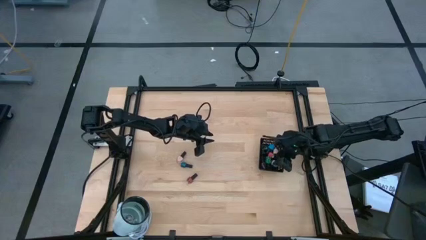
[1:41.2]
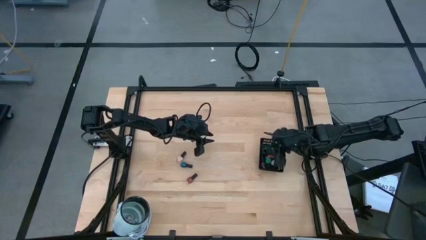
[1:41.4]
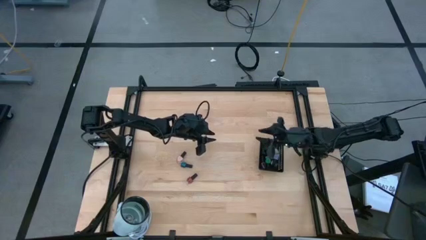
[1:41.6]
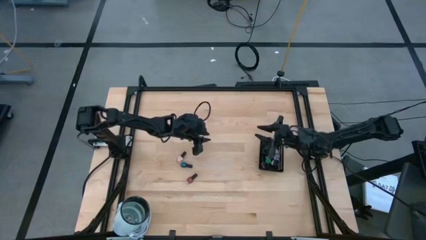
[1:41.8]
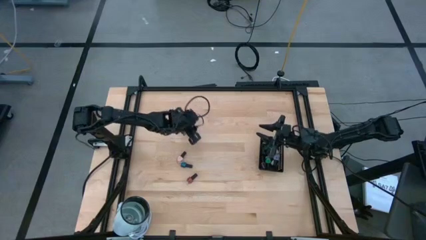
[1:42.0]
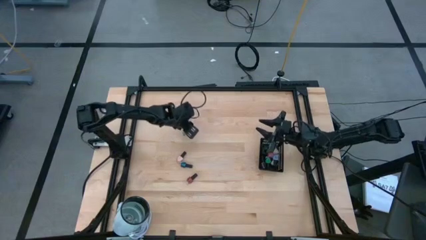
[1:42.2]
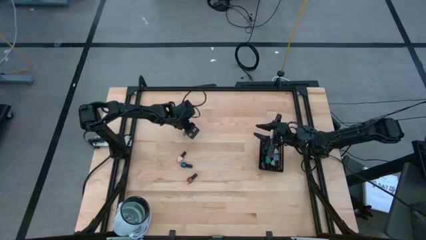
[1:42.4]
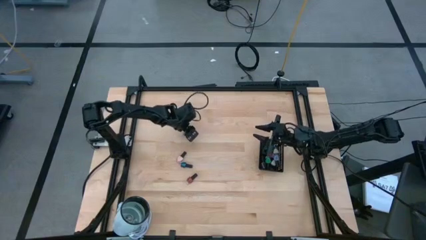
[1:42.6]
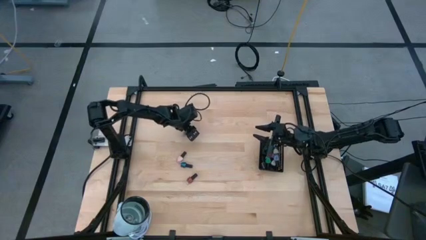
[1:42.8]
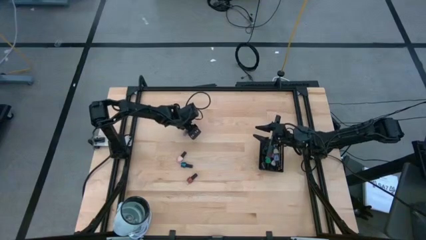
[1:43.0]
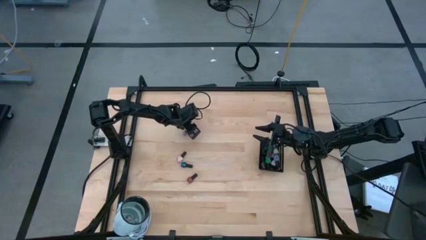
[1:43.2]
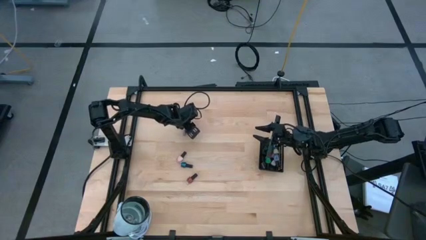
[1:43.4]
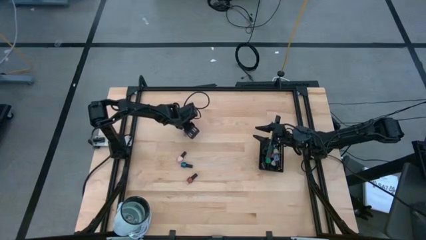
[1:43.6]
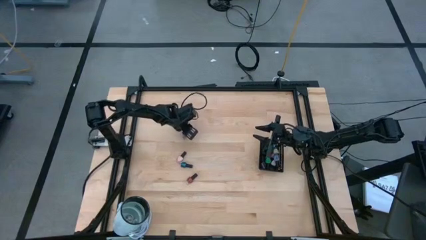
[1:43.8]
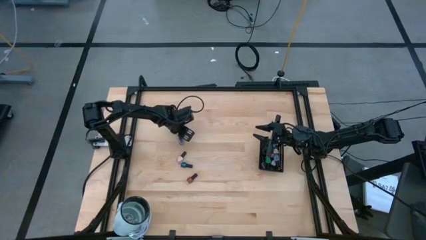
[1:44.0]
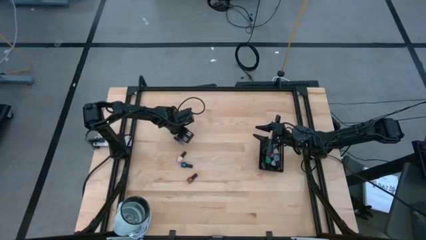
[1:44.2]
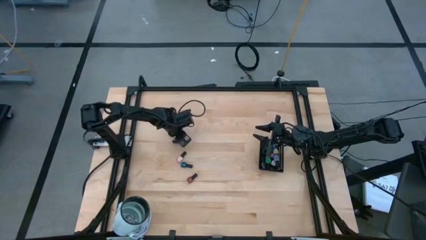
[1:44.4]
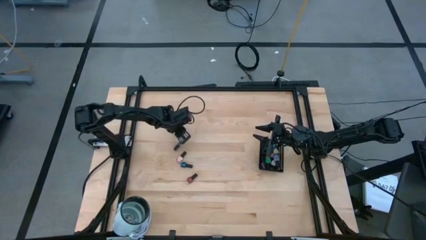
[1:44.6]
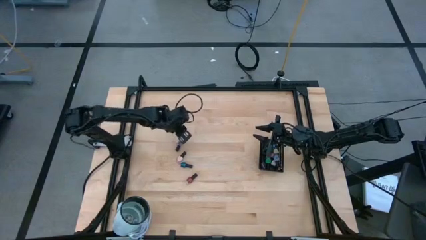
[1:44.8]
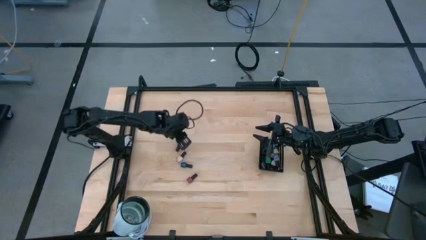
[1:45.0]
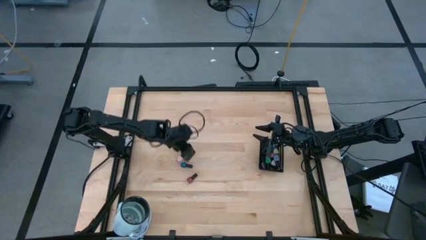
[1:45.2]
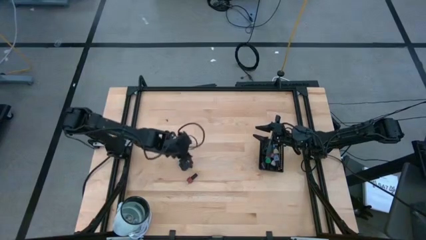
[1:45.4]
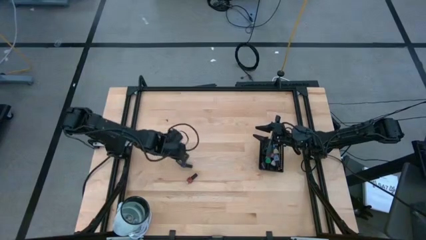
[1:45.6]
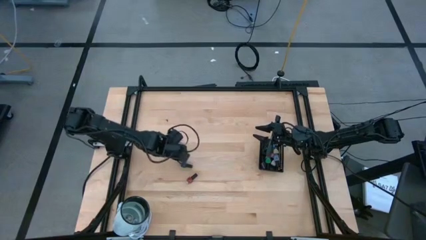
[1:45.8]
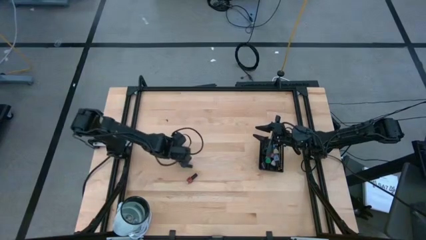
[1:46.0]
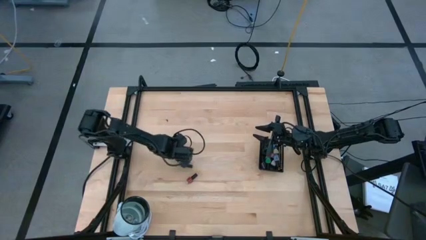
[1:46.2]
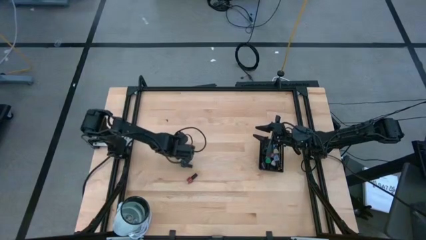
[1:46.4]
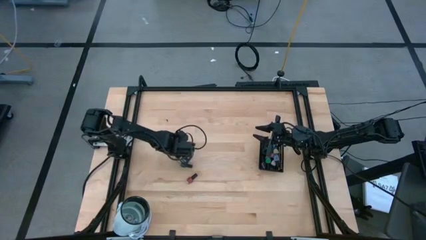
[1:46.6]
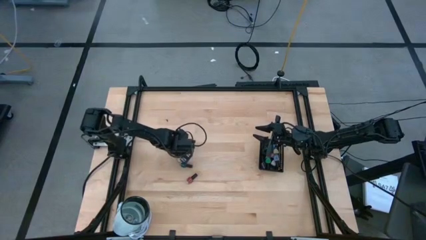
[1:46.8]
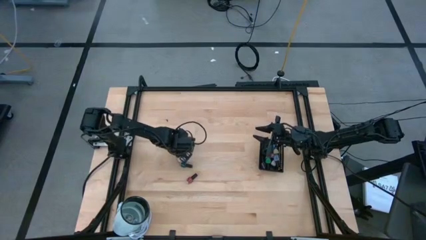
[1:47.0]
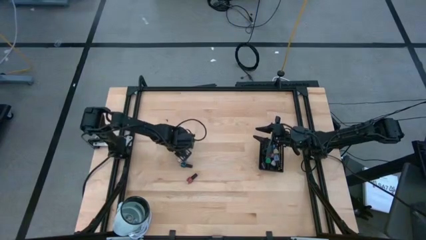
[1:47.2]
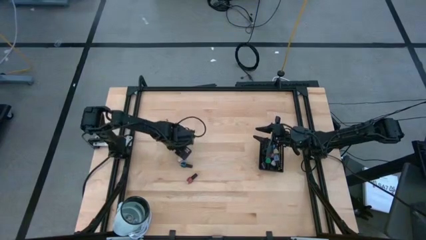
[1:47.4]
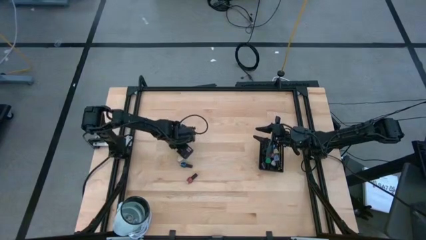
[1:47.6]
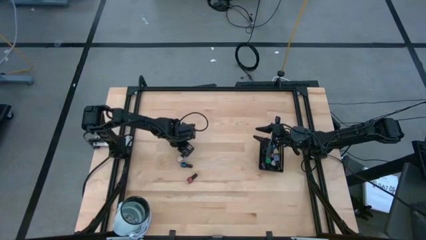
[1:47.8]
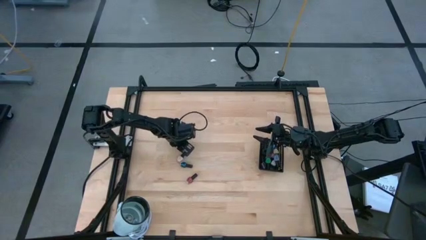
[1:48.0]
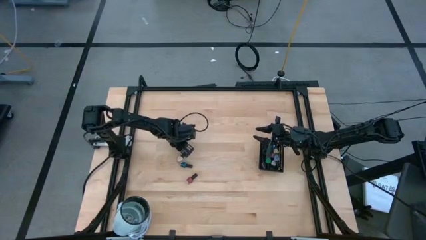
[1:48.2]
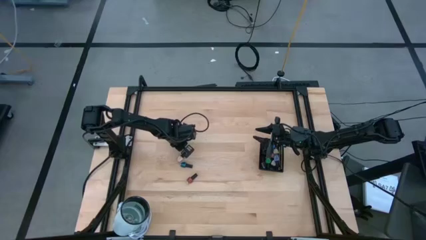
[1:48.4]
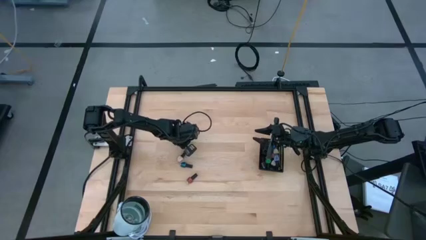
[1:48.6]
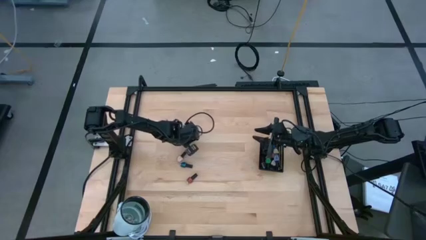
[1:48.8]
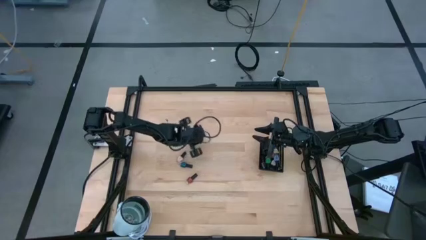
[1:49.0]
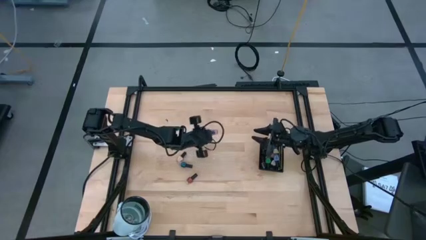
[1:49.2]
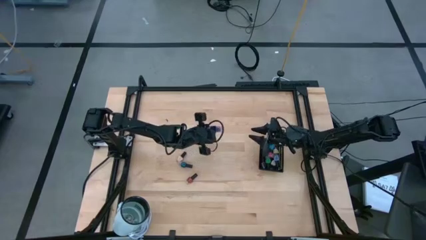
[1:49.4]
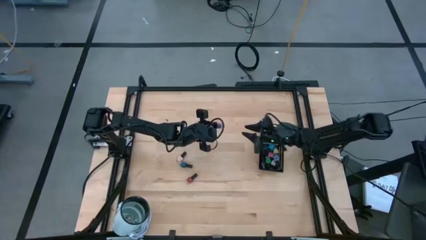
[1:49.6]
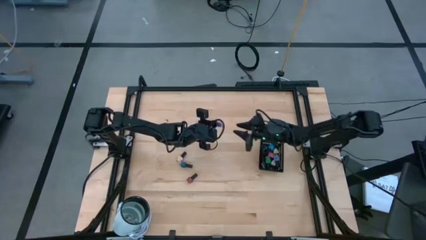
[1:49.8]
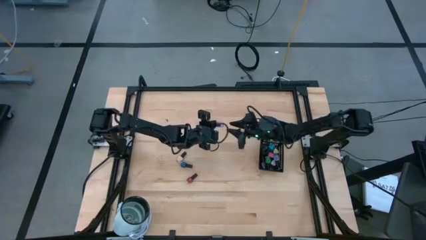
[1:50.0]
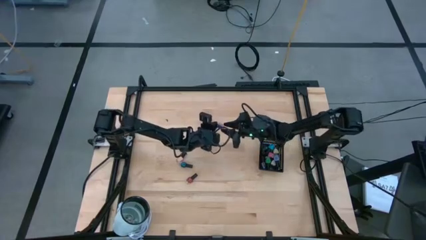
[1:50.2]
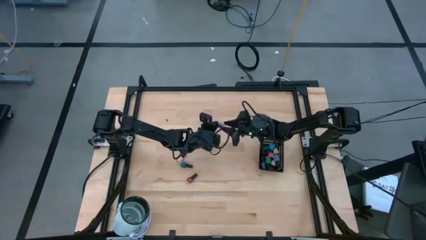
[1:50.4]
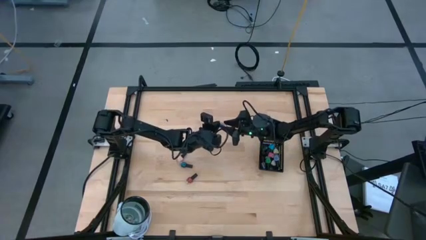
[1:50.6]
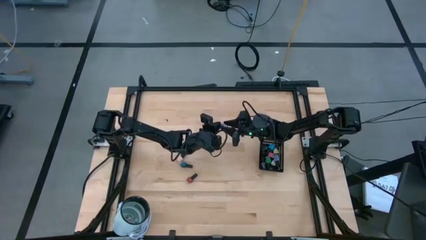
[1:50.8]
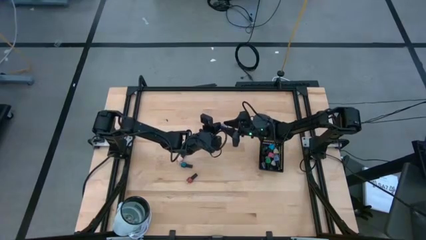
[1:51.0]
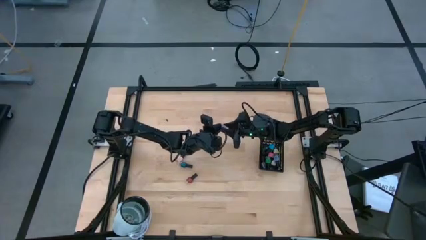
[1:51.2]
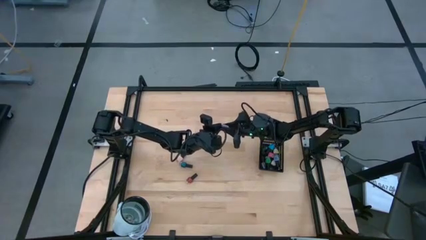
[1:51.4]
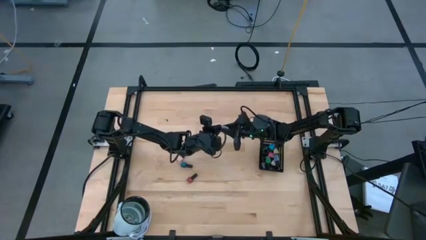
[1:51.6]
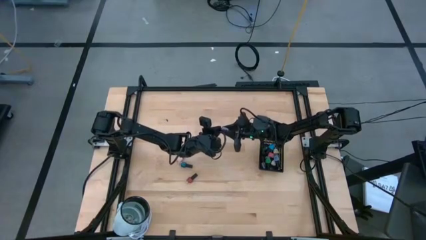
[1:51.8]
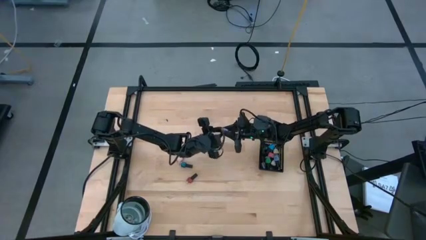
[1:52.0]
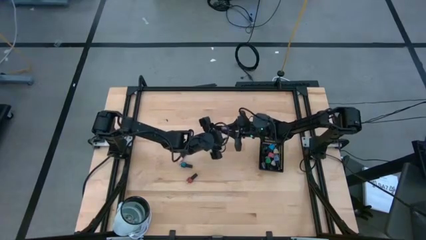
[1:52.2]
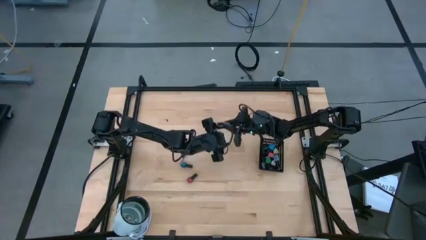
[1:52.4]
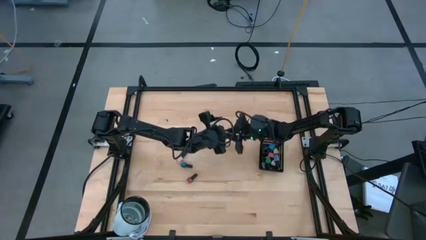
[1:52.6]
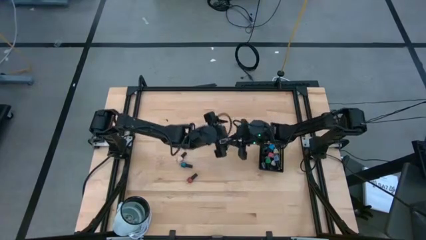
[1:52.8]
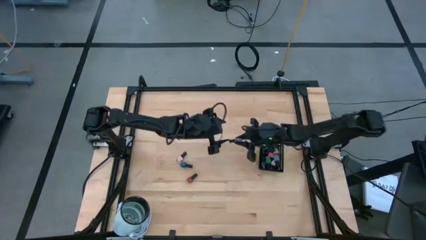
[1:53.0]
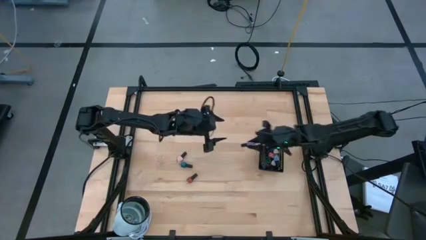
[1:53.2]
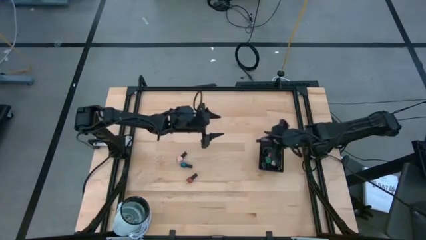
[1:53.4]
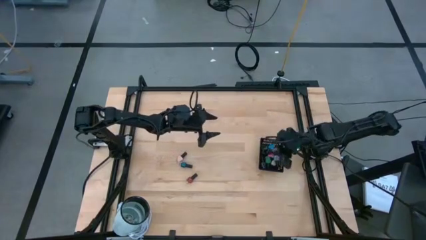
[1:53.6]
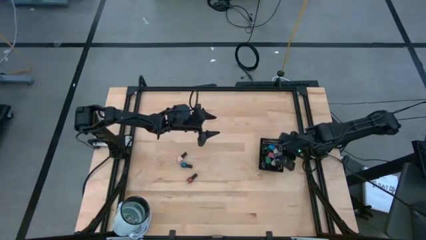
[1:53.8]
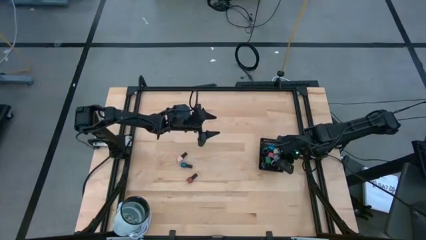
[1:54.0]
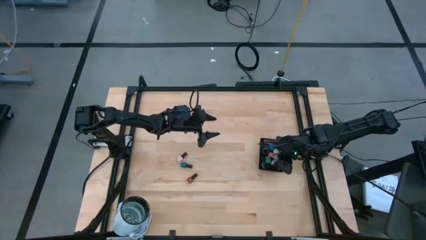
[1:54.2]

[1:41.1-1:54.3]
Task: Pick & Place Nail Polish
Put the purple nail polish into the black basket

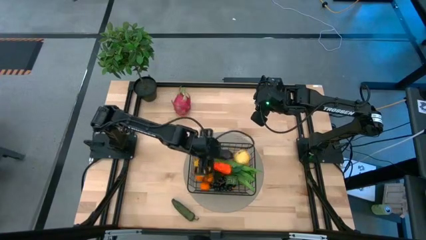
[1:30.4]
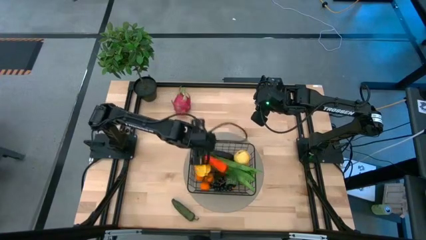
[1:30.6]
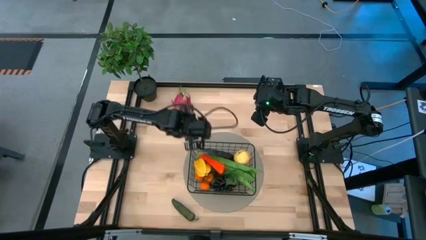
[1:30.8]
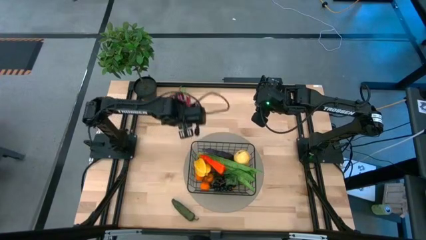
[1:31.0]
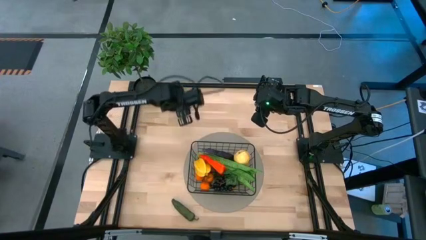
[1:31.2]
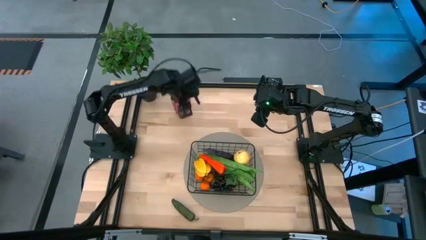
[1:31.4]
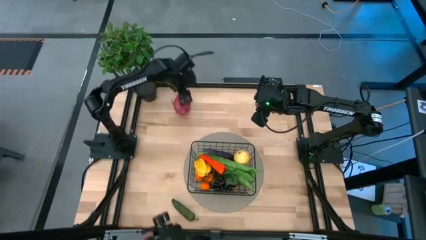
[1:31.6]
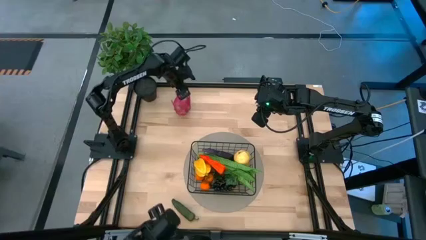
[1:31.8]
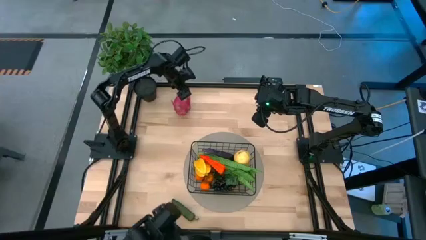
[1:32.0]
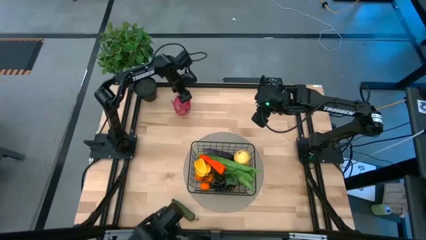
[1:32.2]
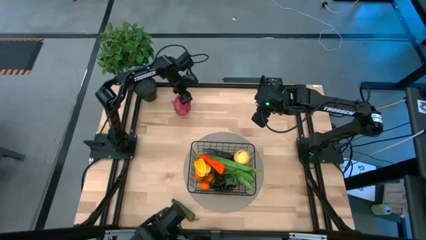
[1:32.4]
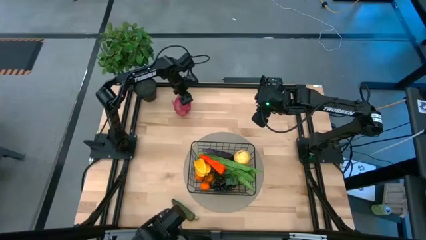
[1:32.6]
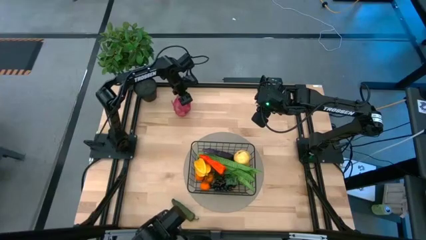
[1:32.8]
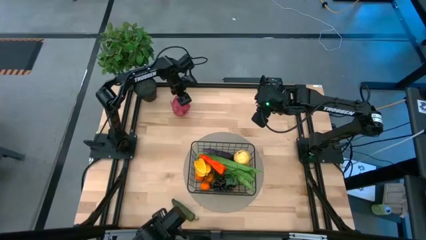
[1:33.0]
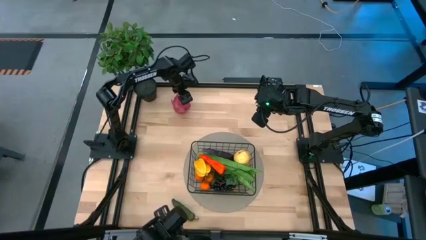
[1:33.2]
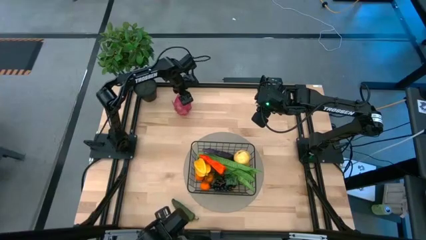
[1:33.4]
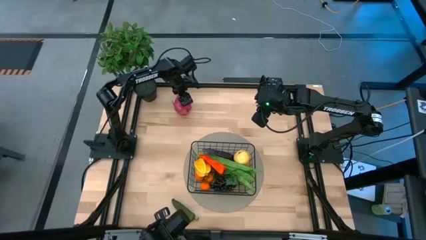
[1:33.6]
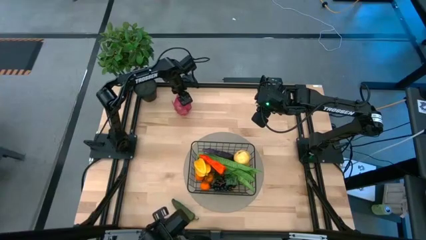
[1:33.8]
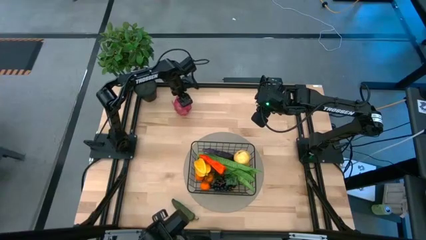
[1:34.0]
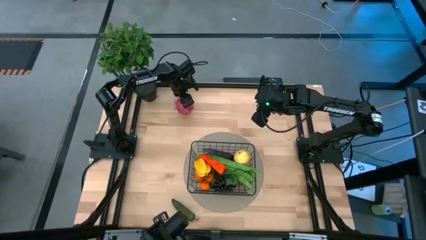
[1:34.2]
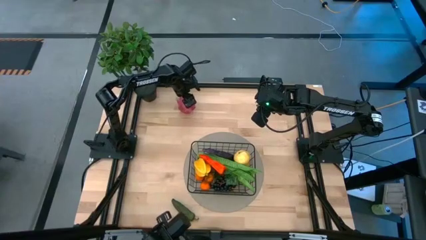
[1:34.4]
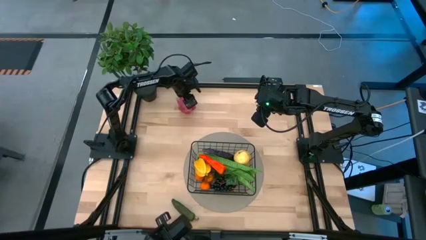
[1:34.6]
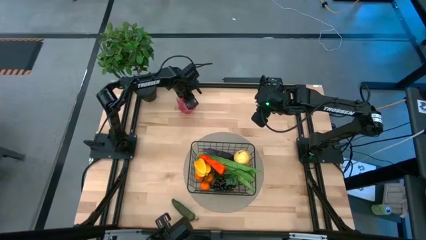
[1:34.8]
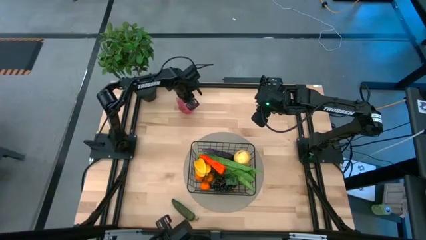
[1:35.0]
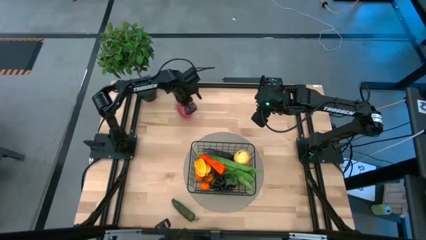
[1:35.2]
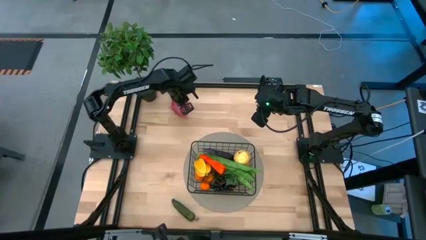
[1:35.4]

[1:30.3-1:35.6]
Task: Build produce basket
Put the dragonfruit into the black basket
